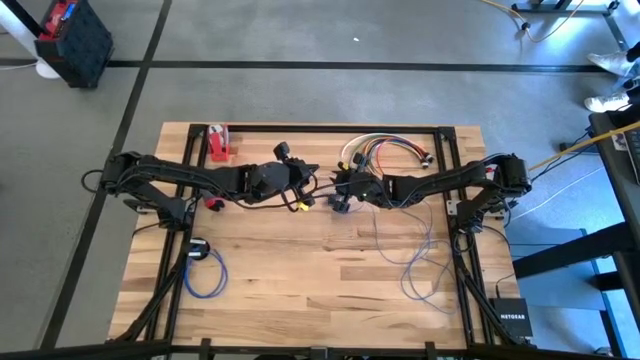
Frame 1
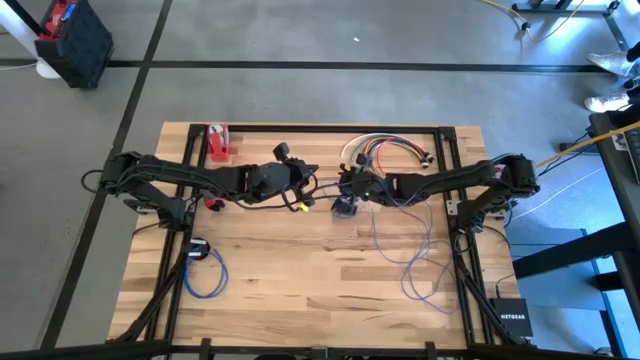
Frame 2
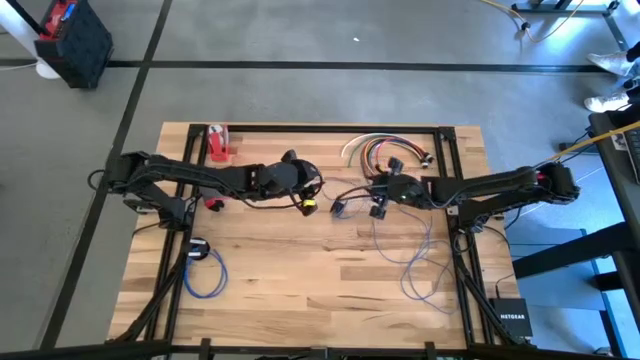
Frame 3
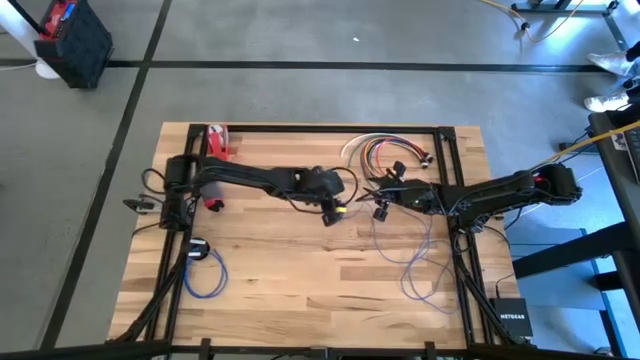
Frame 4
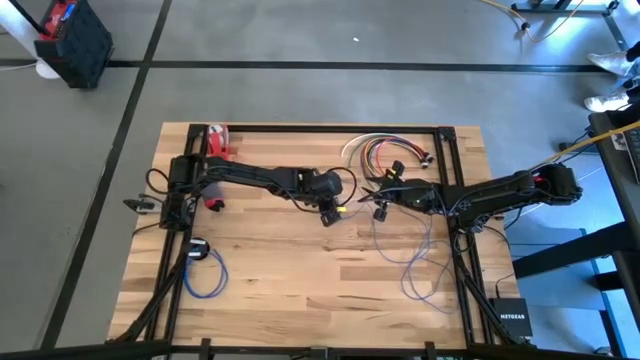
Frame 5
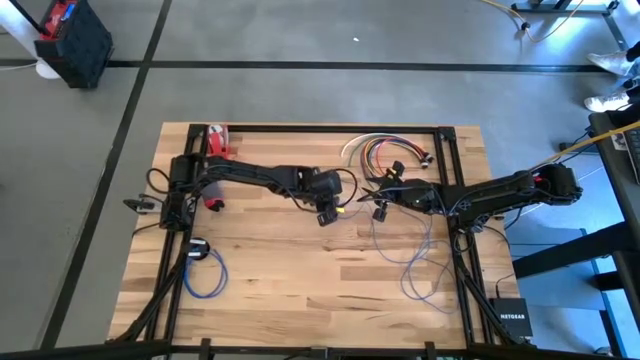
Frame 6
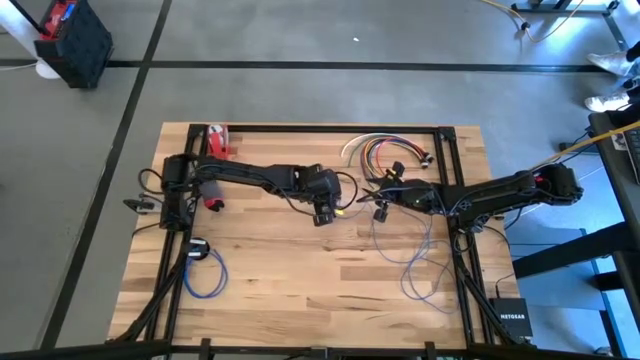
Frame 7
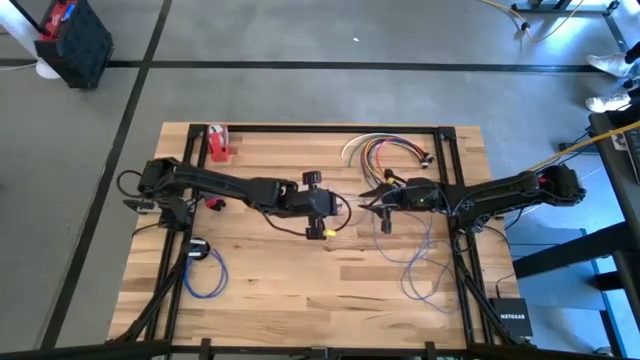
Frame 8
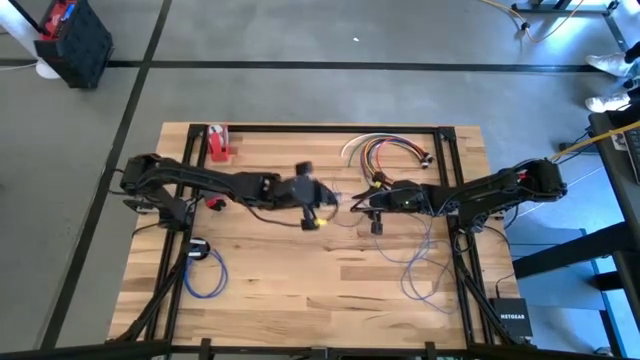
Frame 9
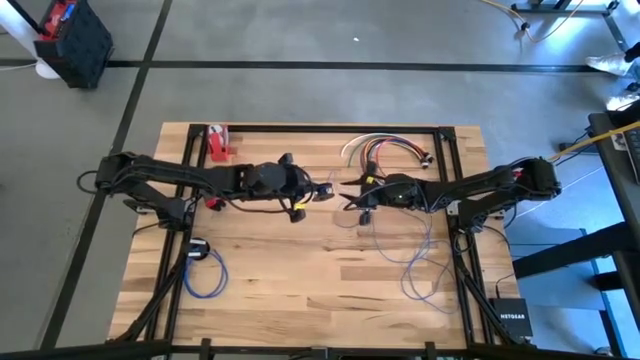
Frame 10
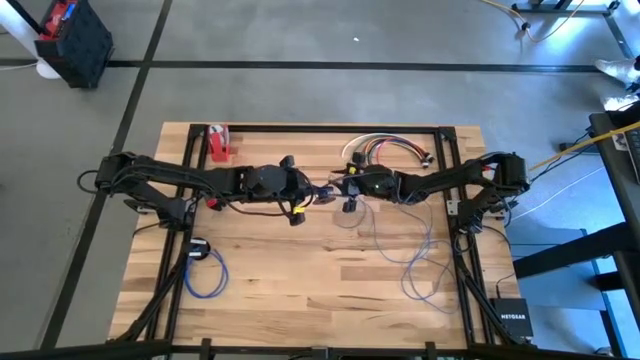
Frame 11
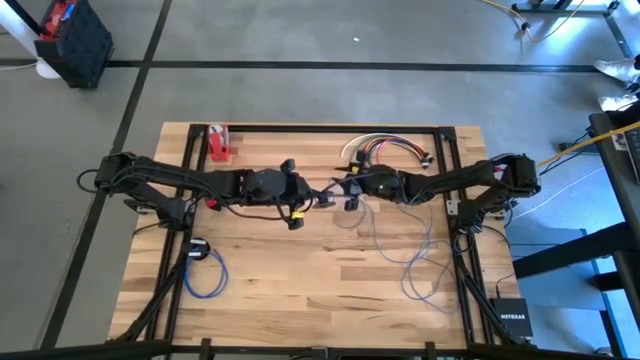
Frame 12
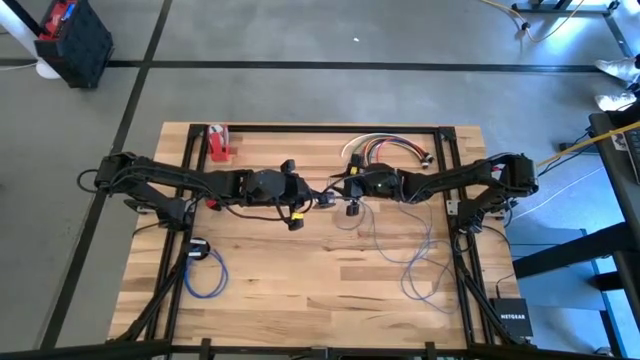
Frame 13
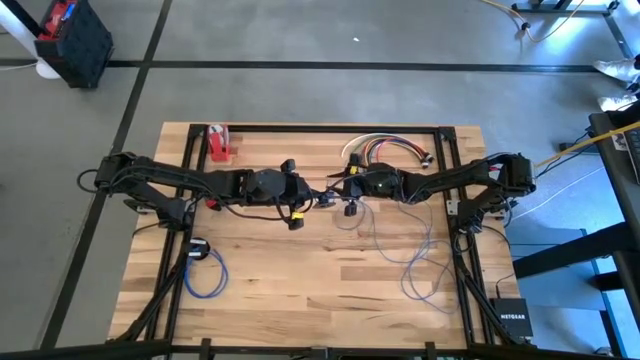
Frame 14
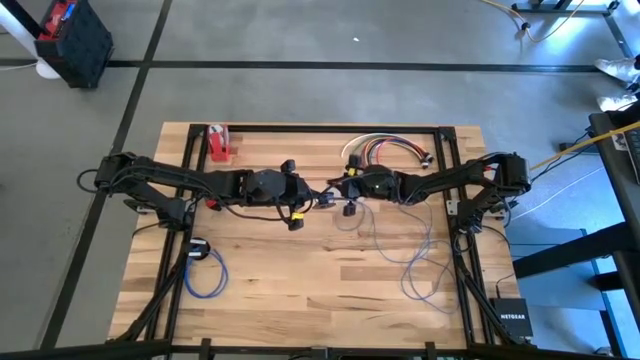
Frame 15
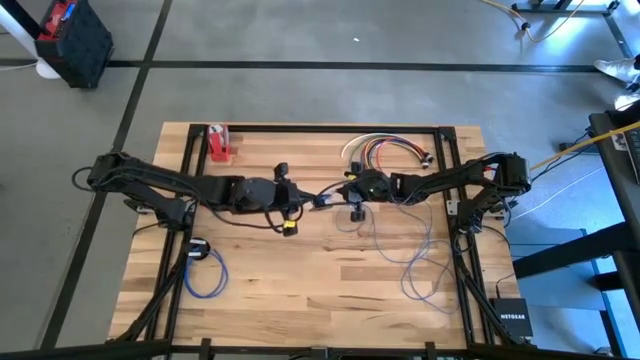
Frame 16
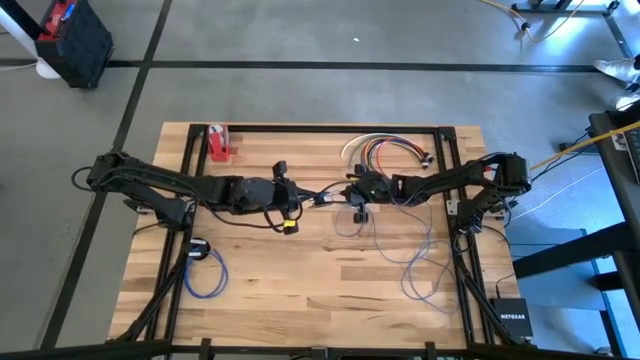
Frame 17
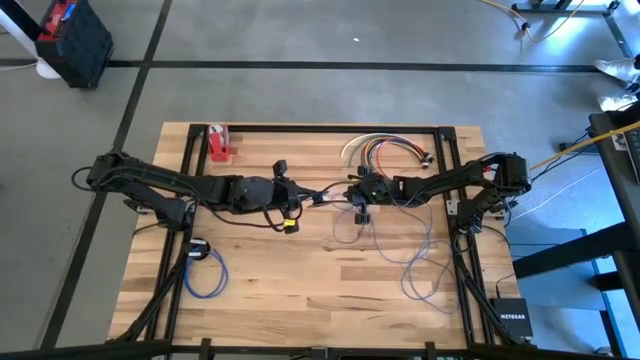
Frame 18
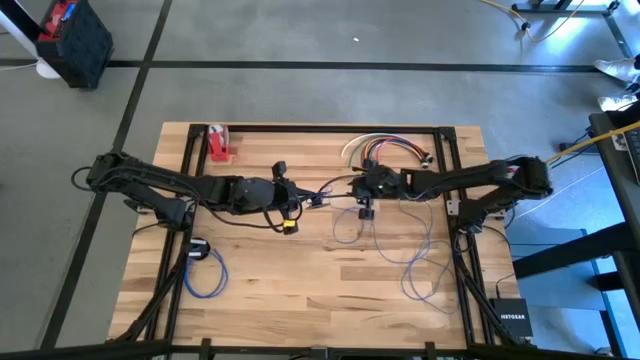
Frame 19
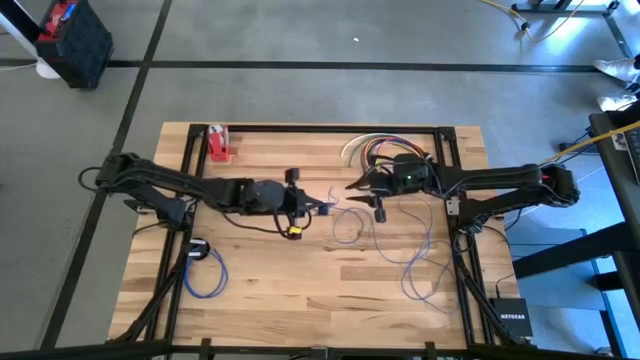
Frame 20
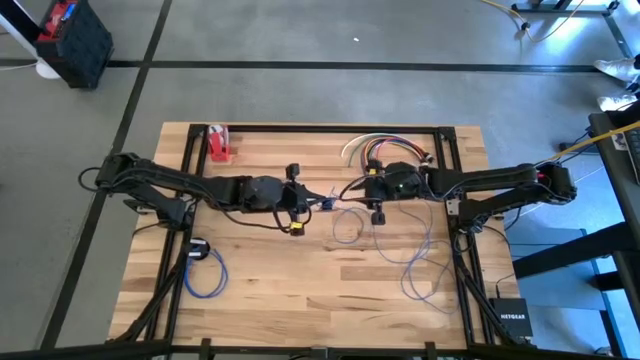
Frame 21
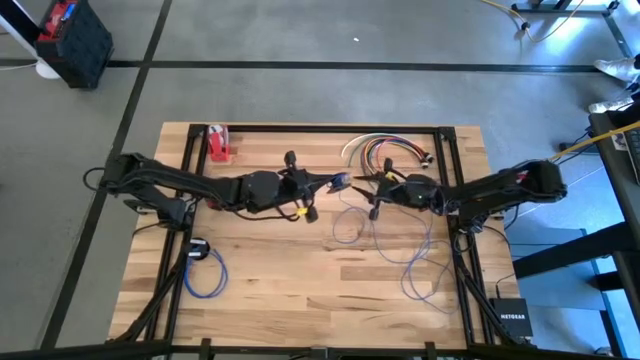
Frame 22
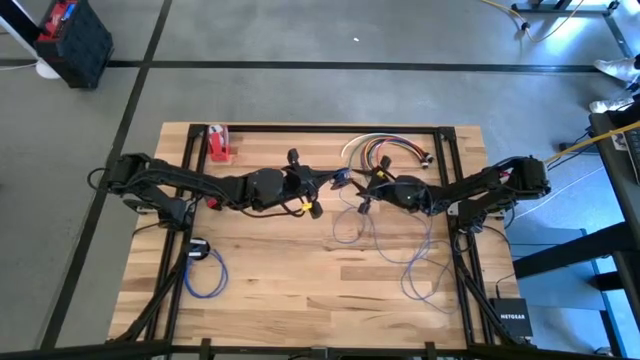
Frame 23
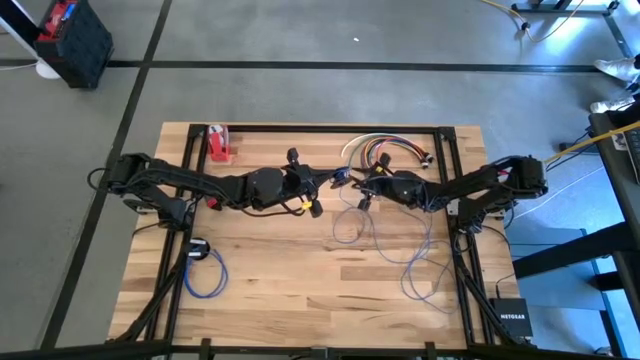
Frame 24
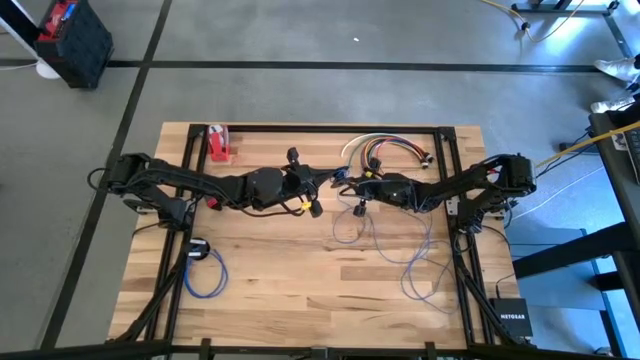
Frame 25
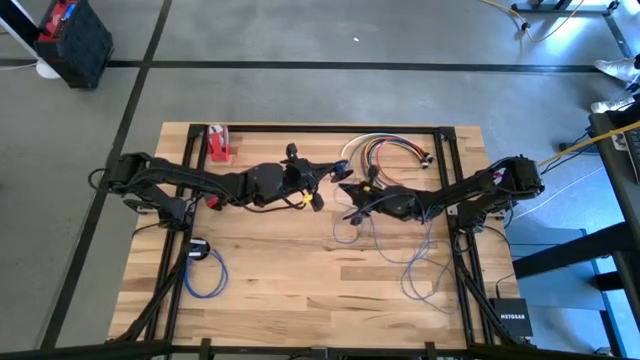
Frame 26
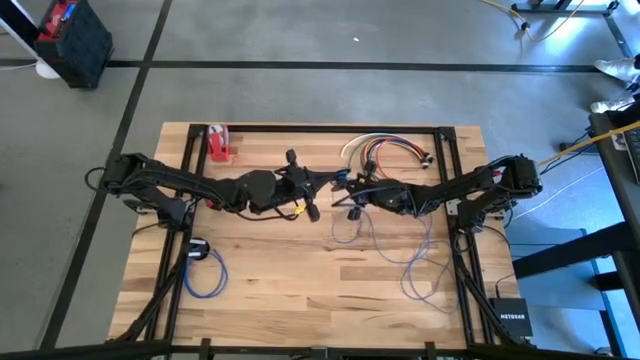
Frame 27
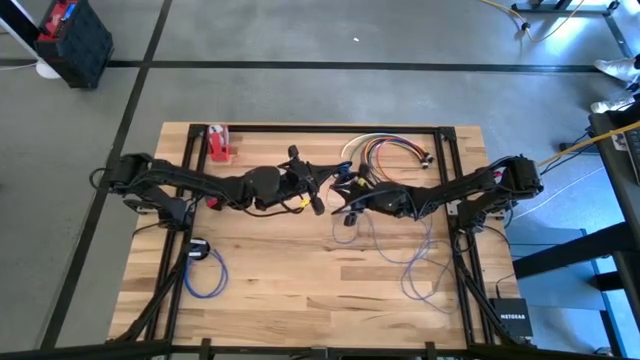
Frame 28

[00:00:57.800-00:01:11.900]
Task: Coil cords
Coil the blue cable wire on the black spool

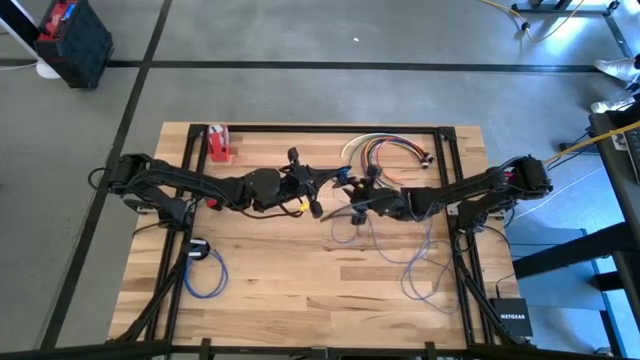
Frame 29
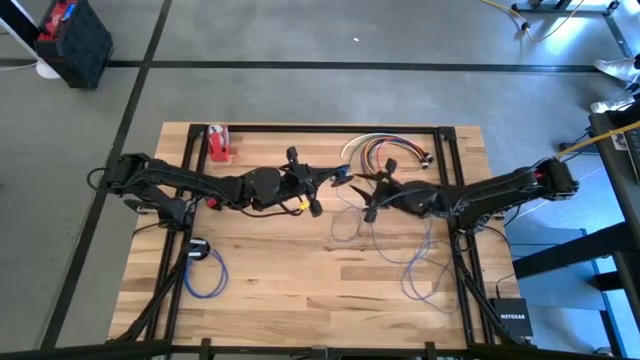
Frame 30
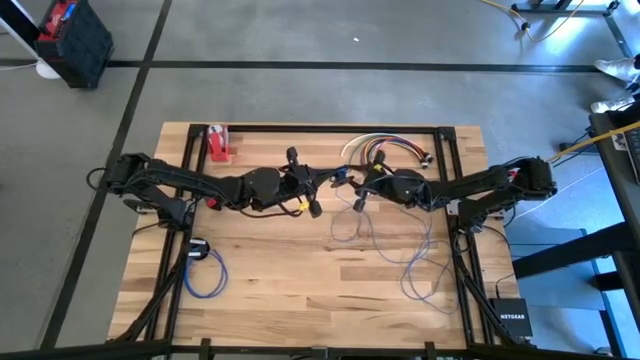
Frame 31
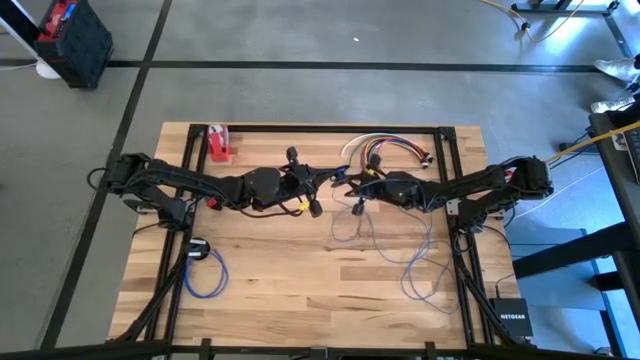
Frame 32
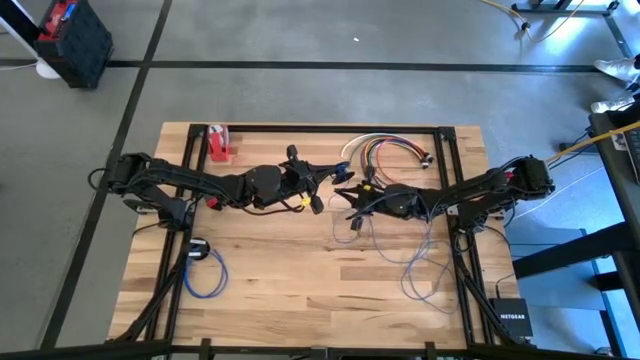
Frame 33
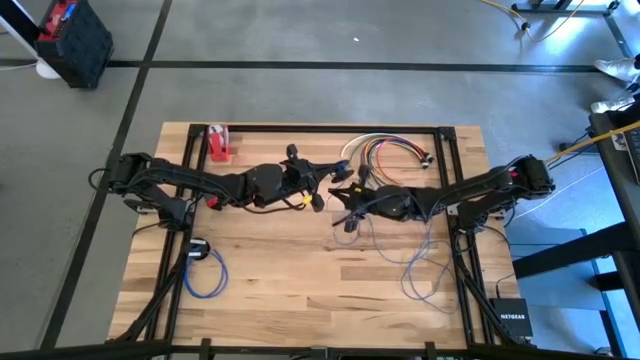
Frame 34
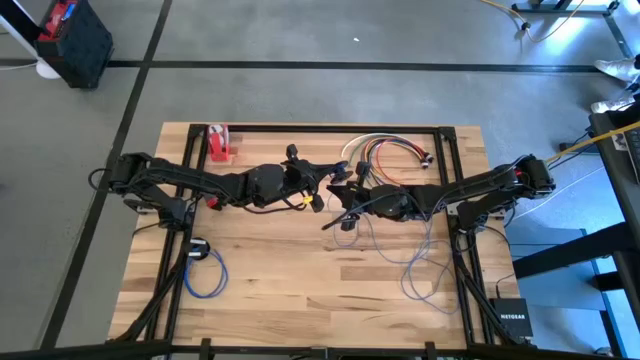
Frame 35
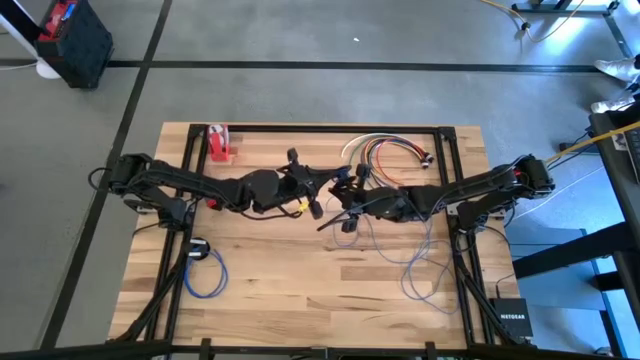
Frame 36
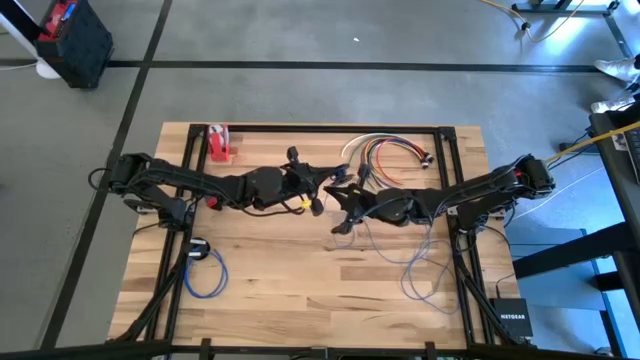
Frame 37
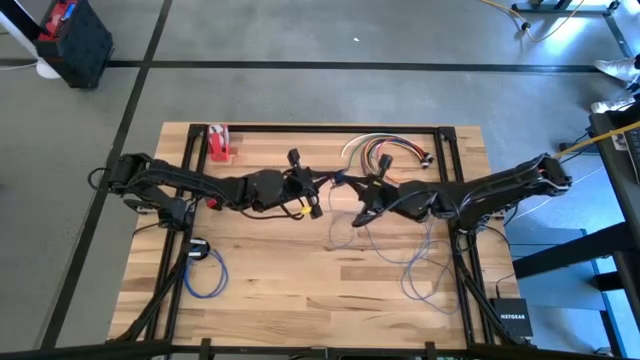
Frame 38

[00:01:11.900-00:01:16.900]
Coil the blue cable wire on the black spool

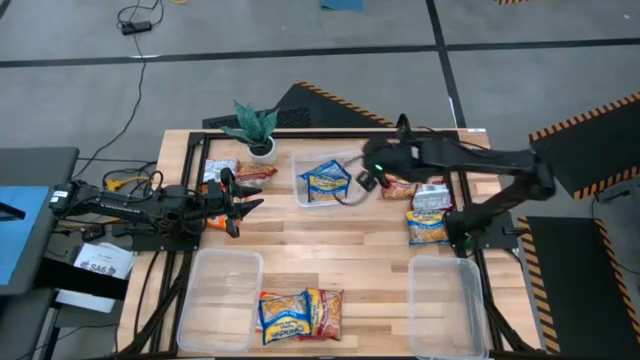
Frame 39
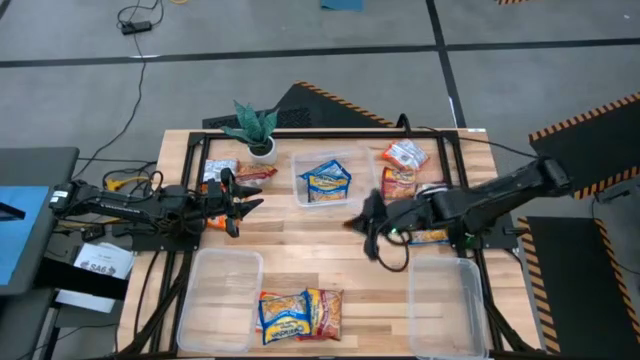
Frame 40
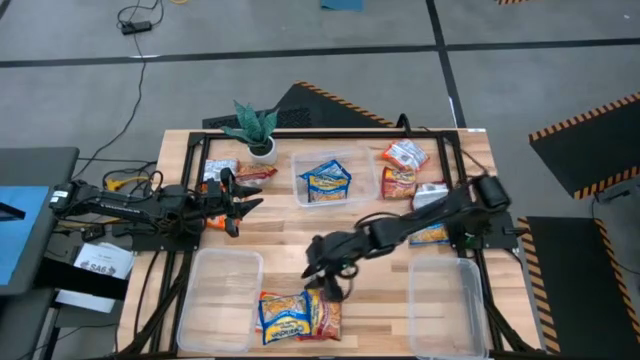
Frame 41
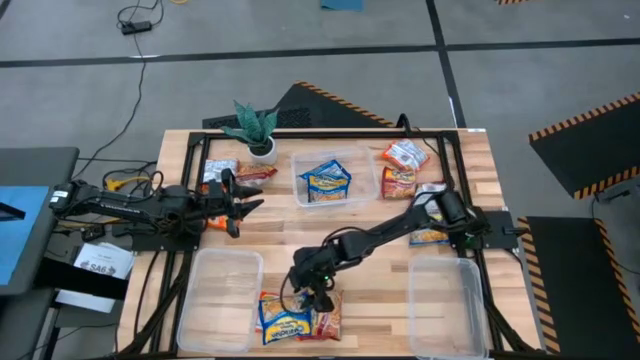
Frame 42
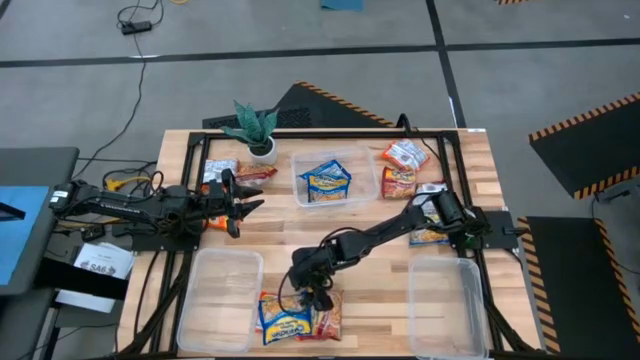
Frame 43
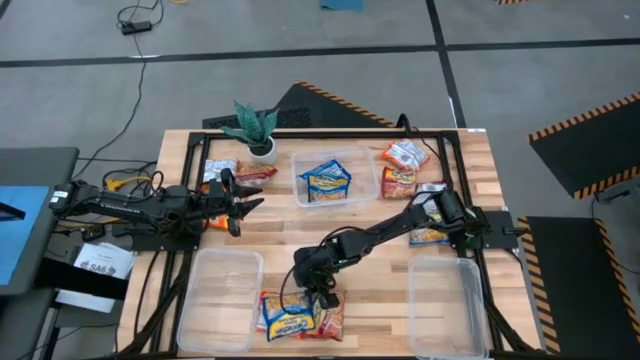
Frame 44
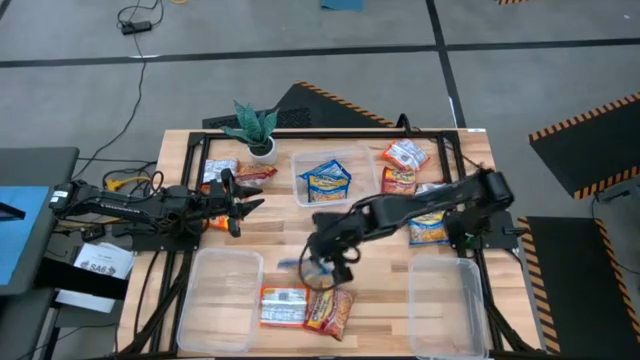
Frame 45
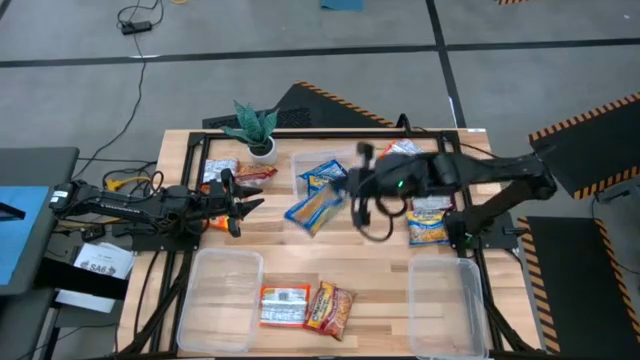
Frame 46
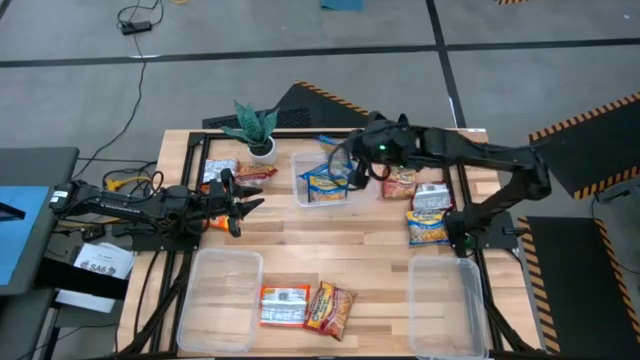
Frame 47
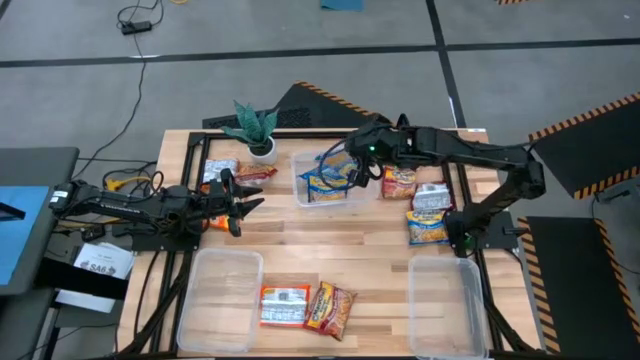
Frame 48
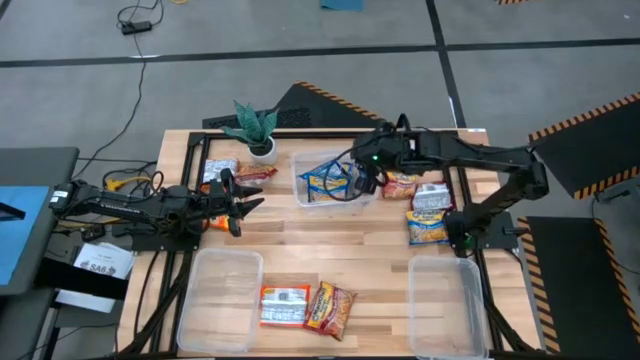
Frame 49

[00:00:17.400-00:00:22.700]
Task: Sort Maruchan noodles
Put the bottom blue noodle packet into the top transparent bin
